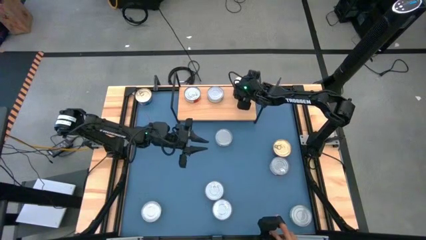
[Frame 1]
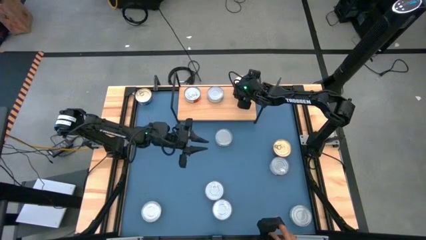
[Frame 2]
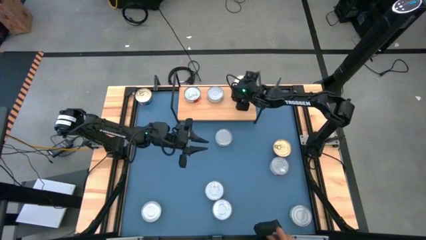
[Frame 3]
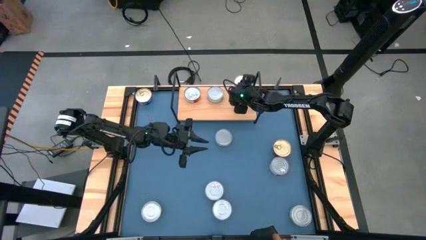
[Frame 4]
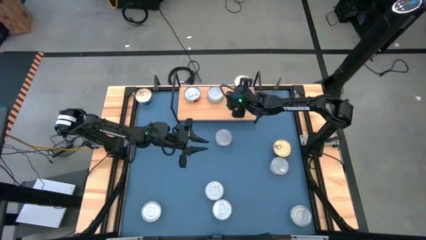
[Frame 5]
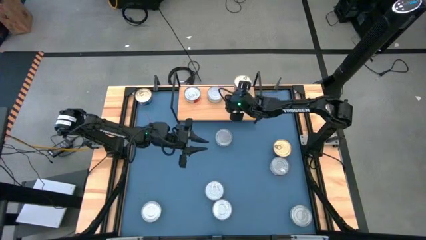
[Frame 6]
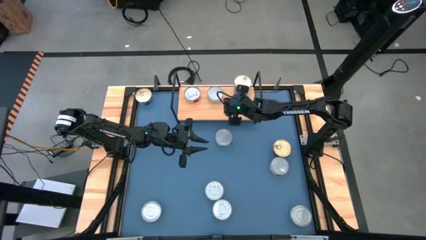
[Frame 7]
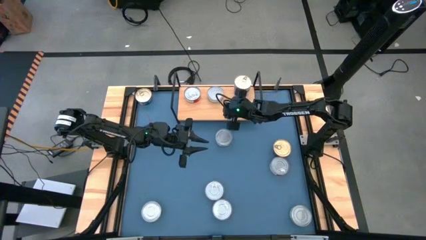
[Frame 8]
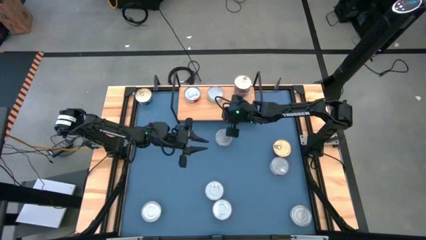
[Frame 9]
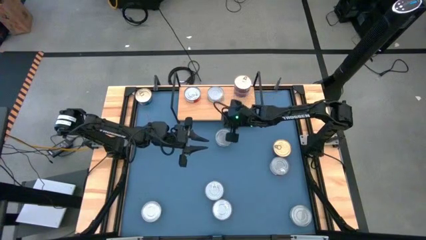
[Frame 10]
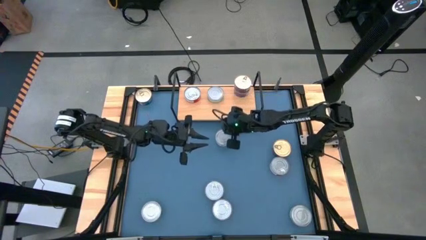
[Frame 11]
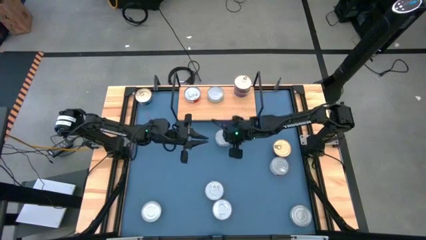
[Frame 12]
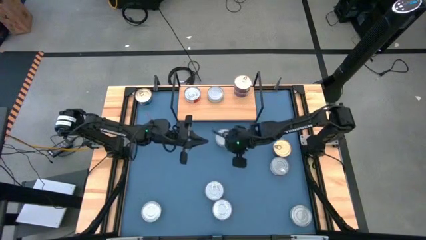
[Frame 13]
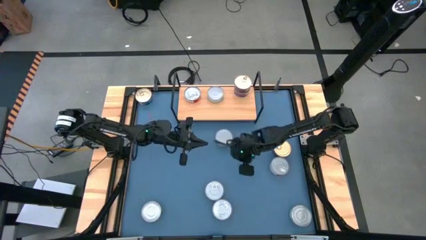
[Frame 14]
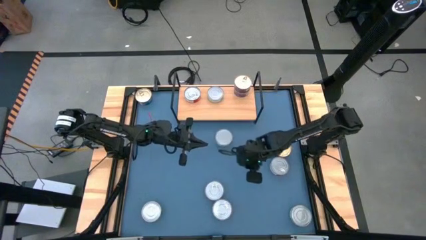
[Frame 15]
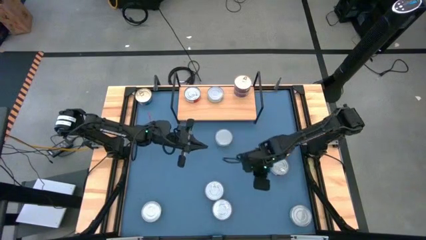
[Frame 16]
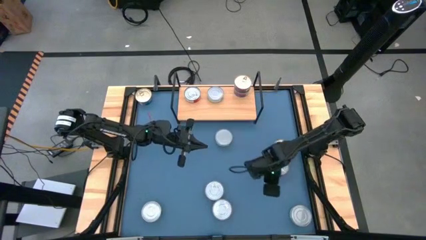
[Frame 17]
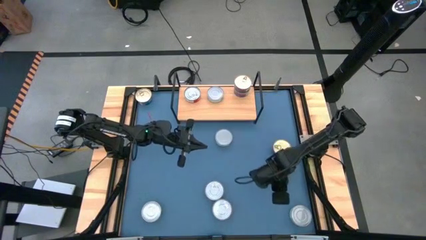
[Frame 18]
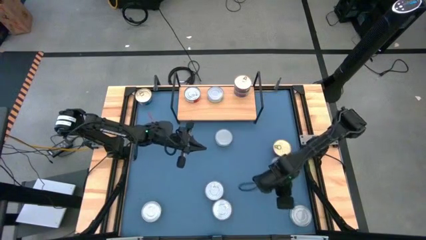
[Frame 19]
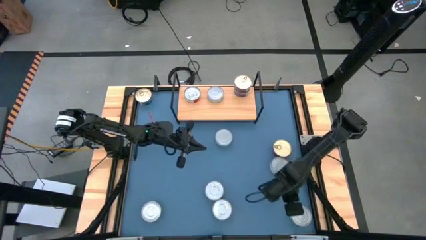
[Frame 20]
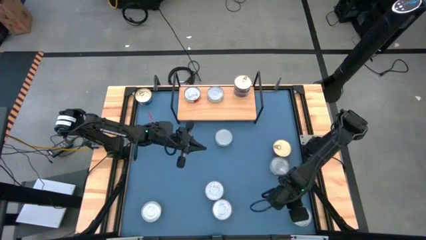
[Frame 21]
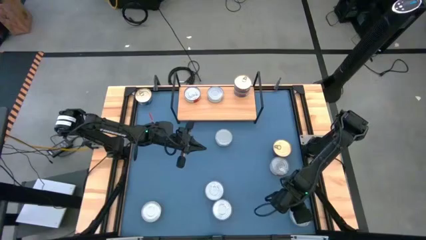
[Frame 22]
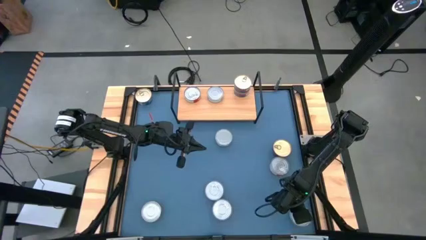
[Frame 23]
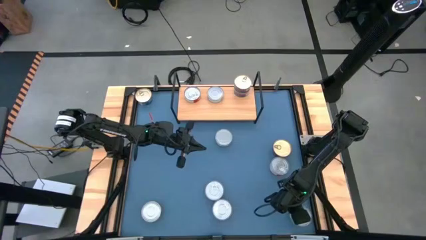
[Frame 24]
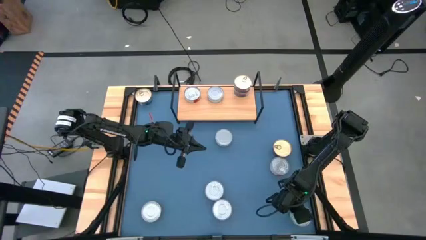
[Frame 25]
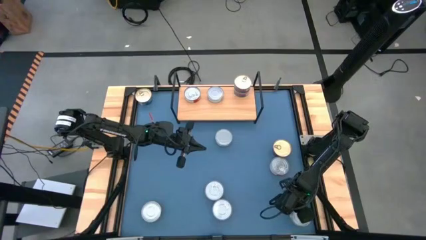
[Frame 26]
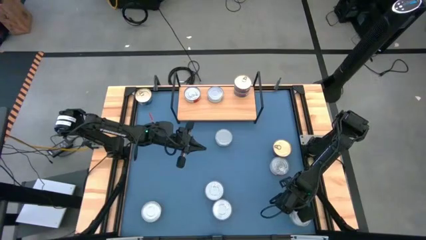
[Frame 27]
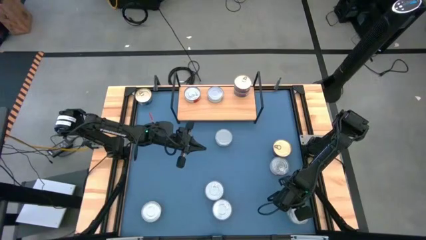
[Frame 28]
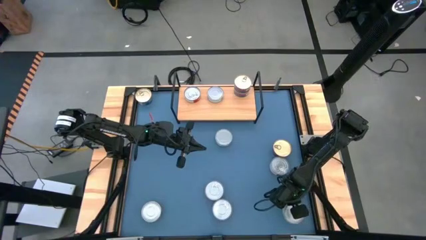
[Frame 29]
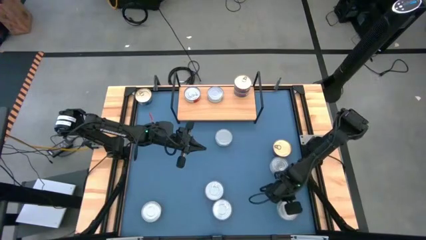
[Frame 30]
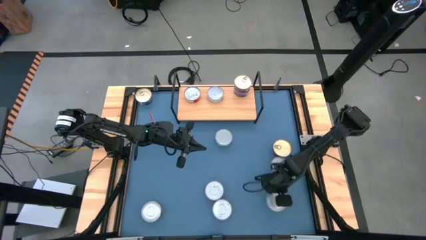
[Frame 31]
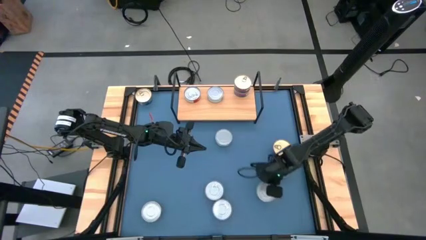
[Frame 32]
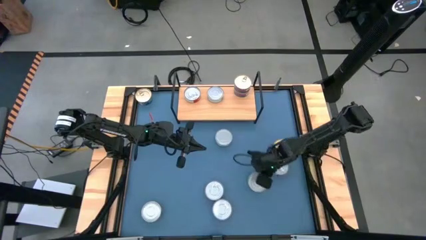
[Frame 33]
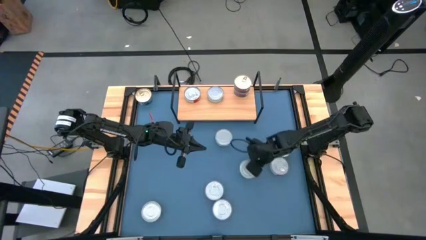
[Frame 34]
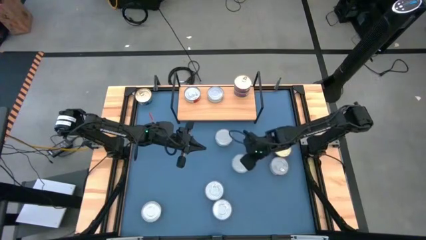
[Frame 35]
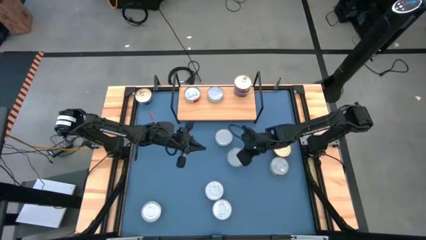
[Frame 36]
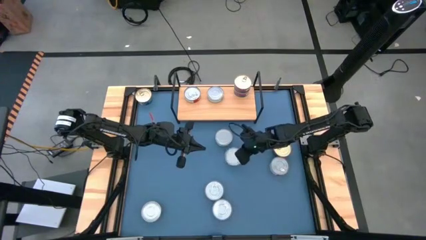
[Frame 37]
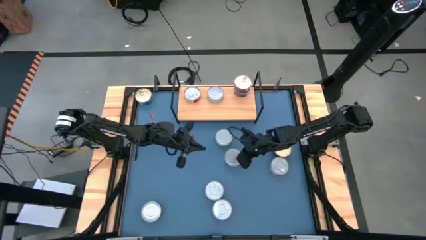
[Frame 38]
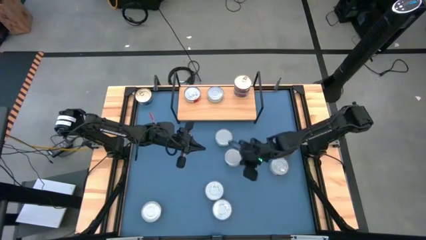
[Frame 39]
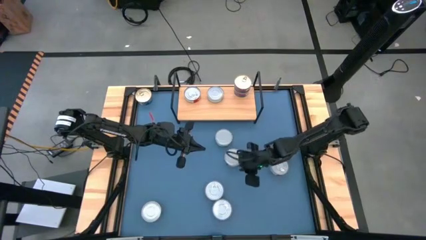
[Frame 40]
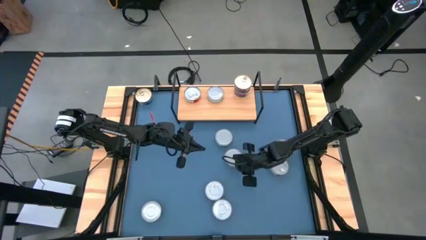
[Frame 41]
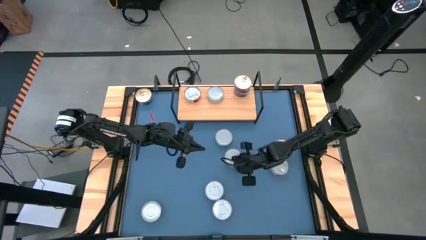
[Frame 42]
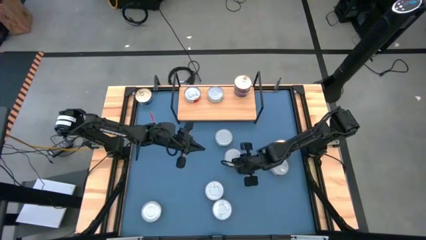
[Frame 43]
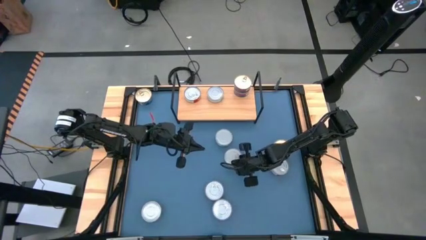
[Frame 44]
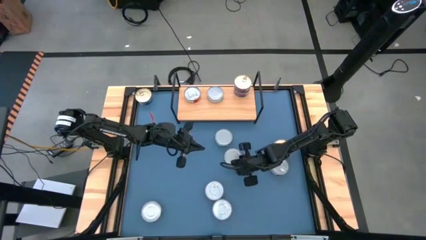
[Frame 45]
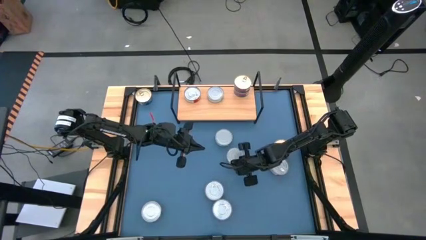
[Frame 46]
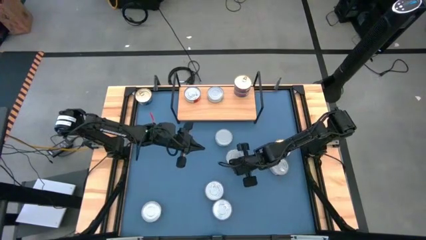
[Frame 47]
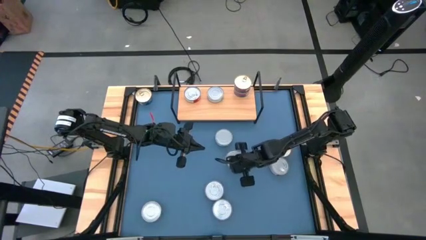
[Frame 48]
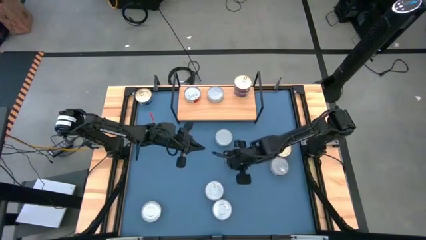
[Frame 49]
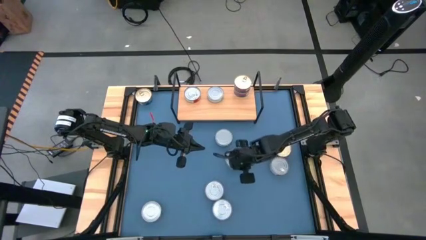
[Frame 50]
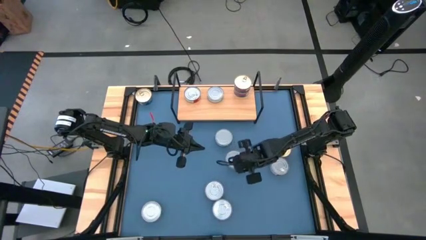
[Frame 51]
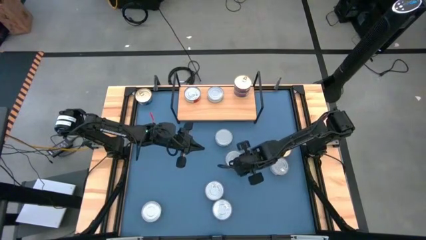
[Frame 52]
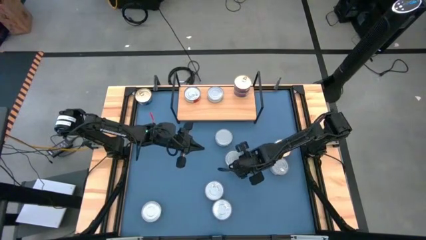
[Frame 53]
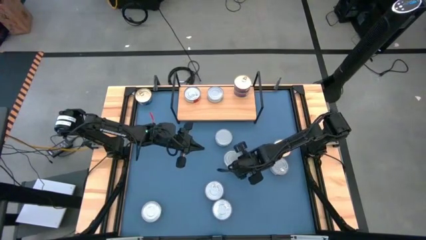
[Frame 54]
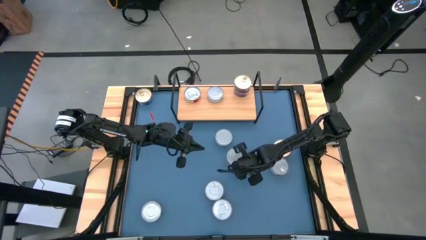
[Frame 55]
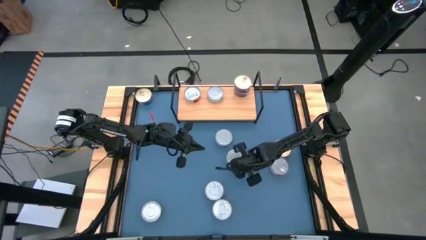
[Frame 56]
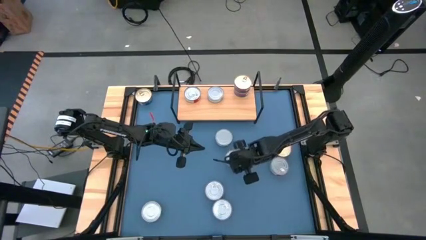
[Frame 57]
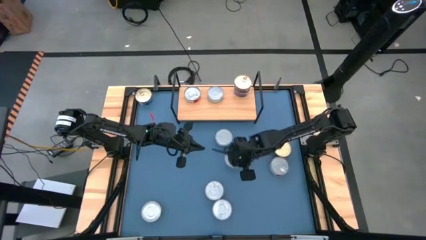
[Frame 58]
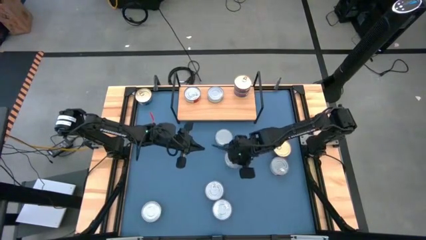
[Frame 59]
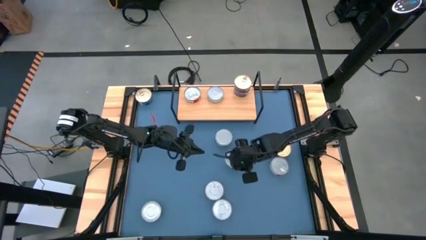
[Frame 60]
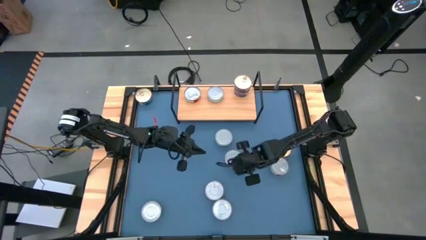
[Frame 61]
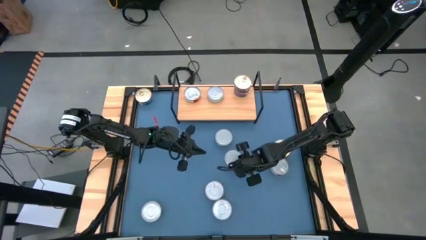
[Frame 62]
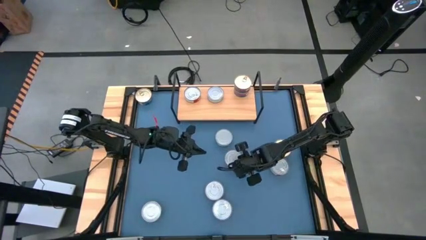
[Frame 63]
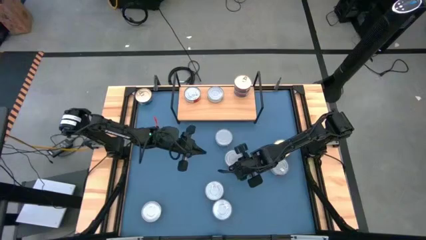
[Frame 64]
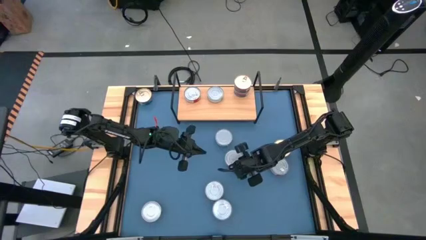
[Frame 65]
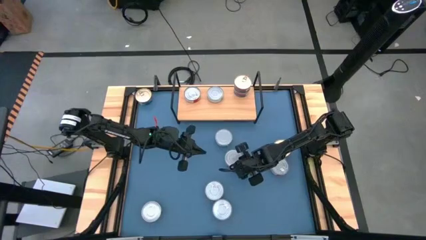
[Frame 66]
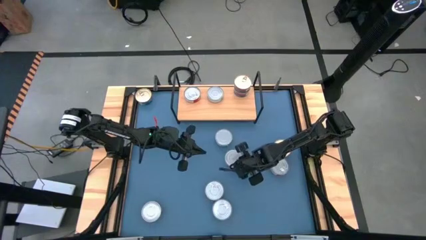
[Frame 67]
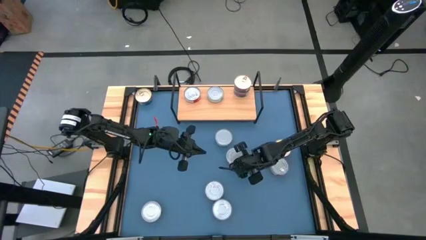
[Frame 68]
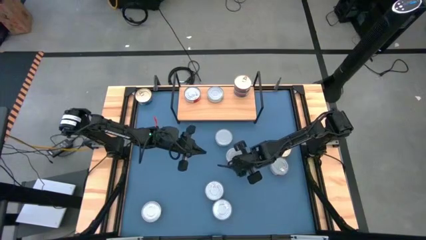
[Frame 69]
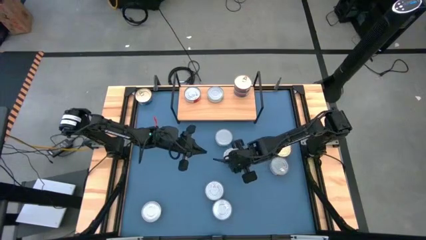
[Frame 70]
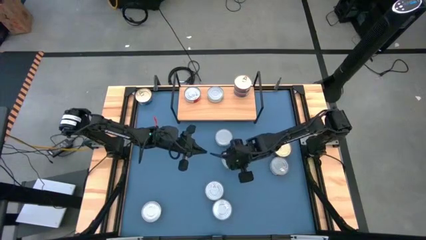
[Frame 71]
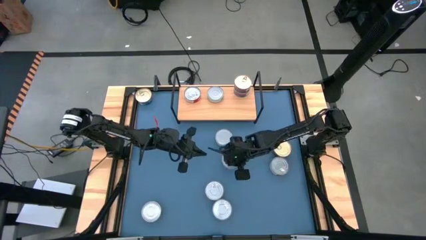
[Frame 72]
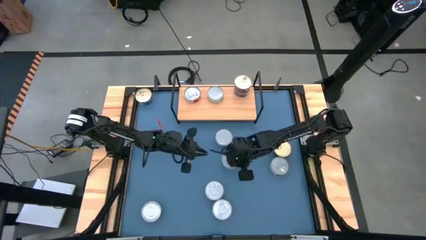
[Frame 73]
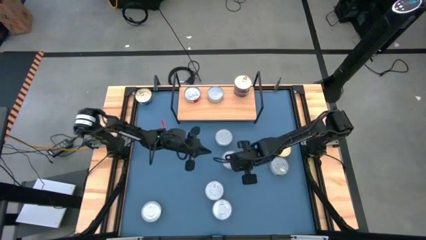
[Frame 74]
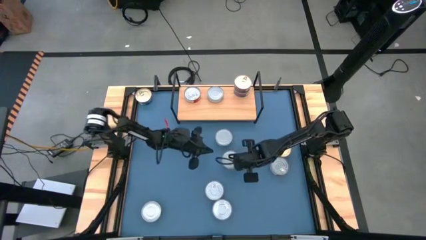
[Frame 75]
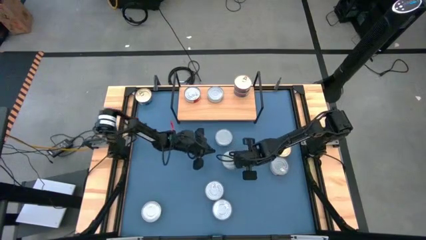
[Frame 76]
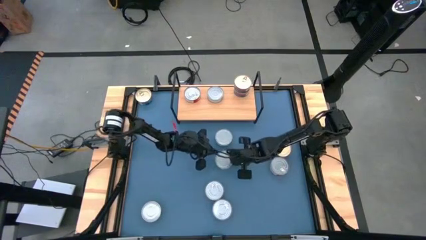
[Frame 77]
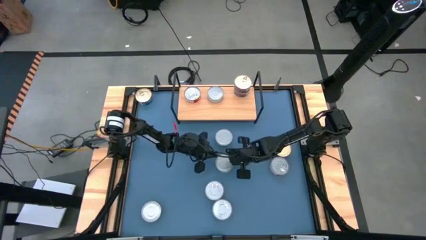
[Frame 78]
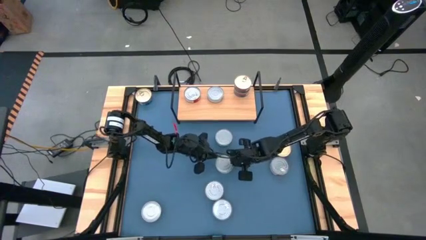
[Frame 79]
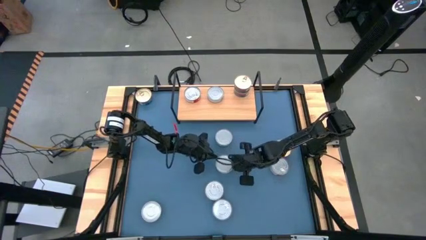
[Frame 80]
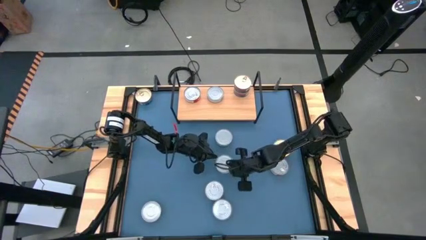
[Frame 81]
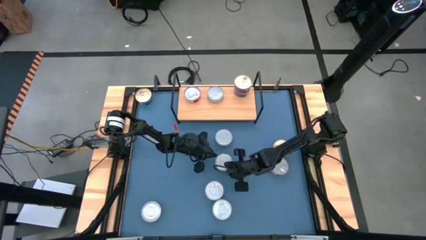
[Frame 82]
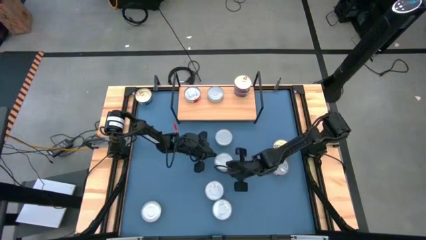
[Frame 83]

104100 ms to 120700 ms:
Task: Stack canned seafood by type on shelf
Stack the green tuna can on top of the green tuna can on the shelf

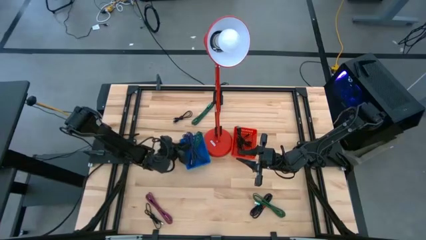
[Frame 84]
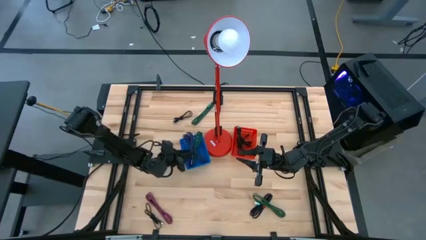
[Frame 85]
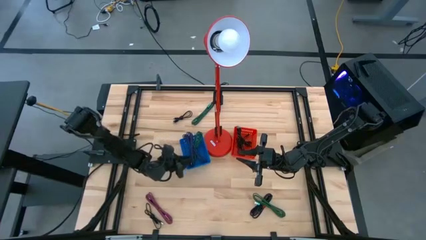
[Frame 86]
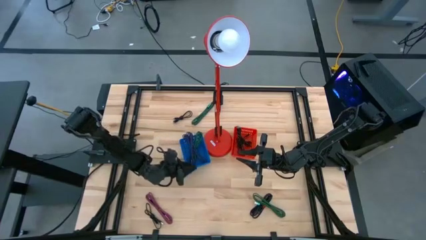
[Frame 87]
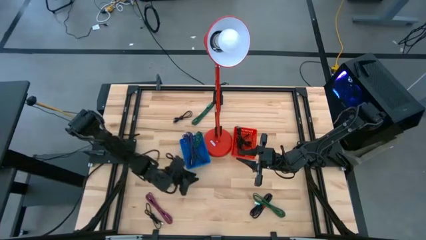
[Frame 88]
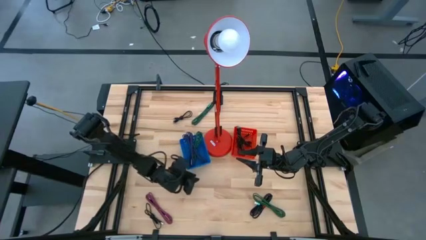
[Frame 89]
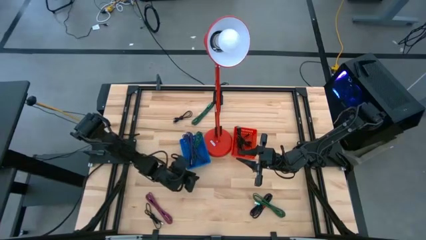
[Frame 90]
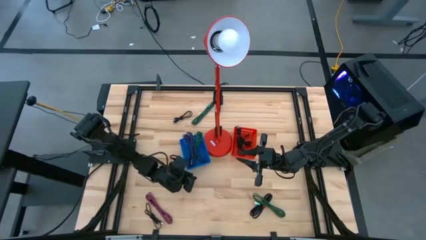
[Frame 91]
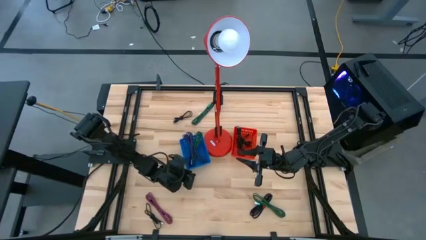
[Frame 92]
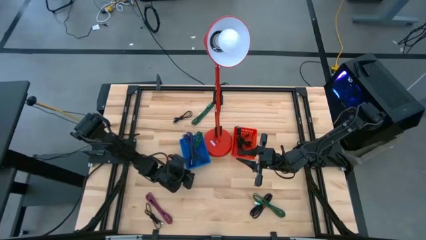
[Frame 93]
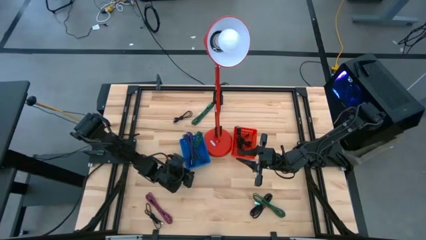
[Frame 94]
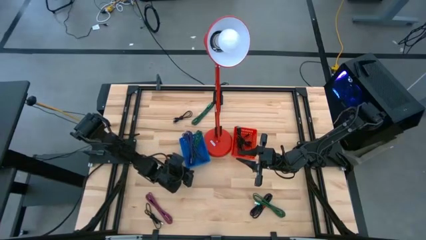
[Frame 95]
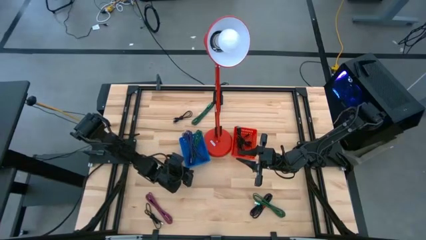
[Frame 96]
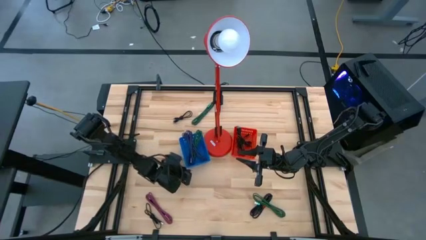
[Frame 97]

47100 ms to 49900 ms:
Task: Pick & Place USB Port
Adjust the blue bin
